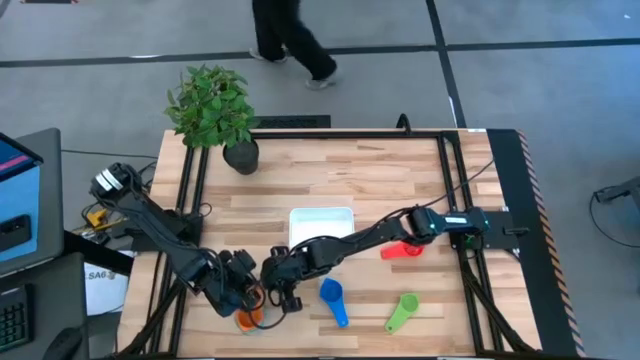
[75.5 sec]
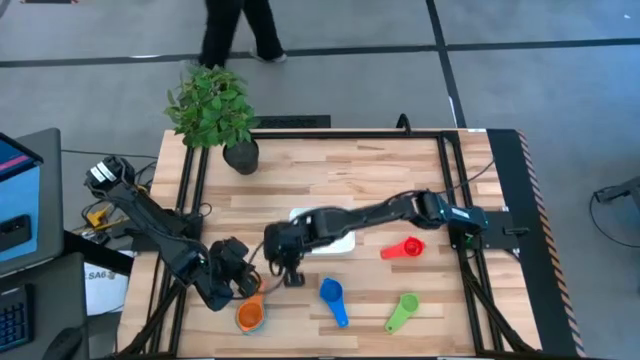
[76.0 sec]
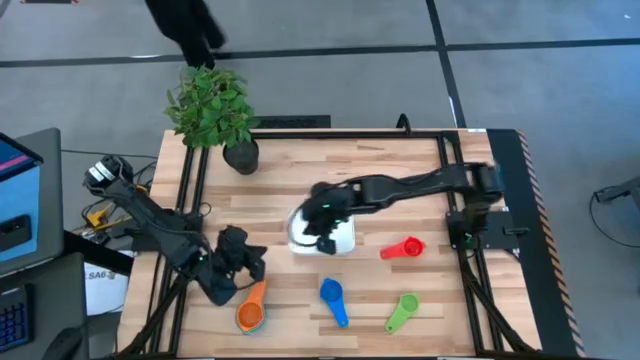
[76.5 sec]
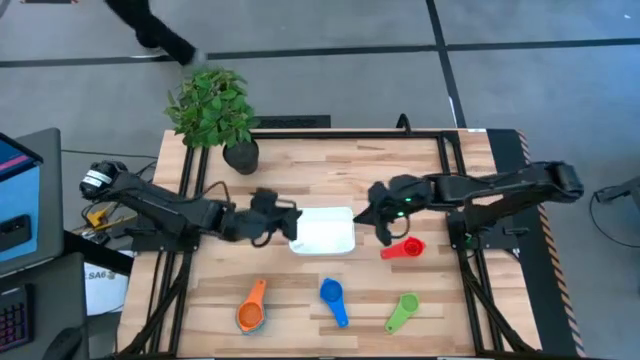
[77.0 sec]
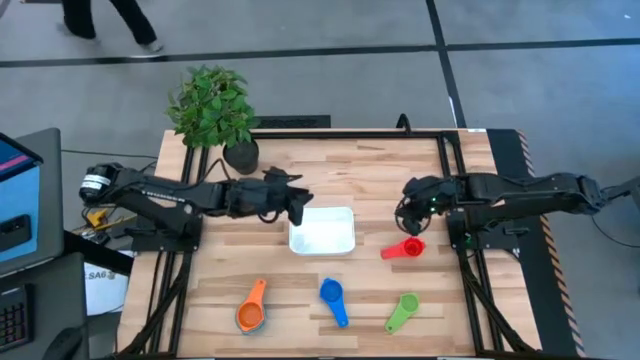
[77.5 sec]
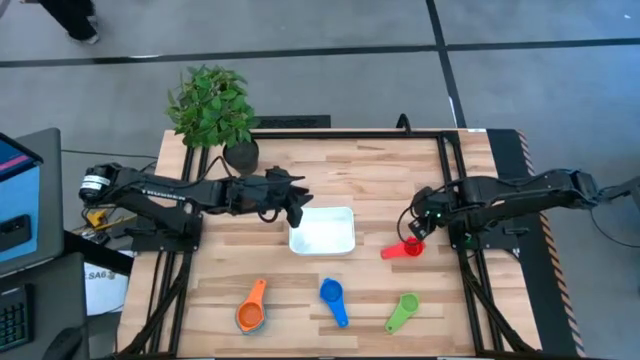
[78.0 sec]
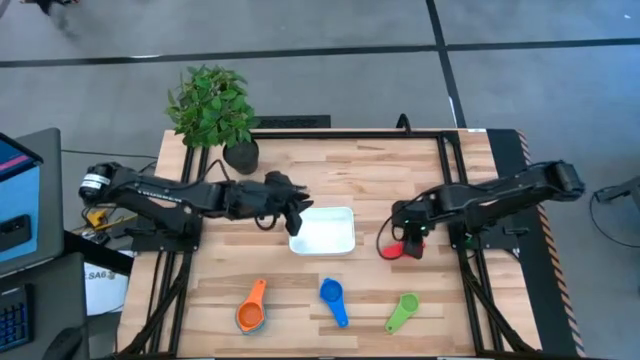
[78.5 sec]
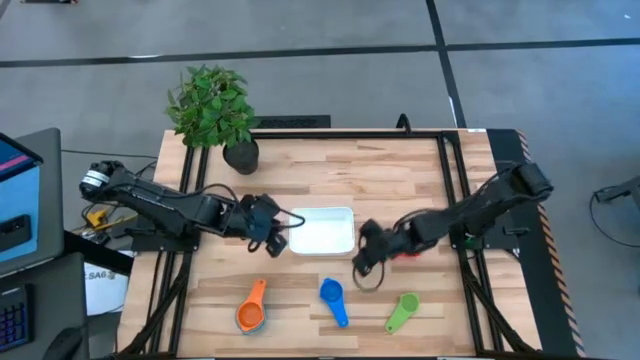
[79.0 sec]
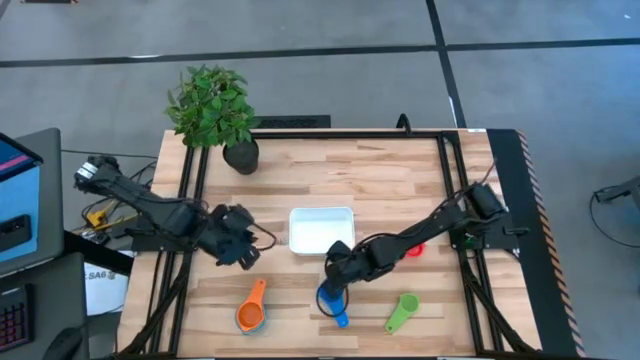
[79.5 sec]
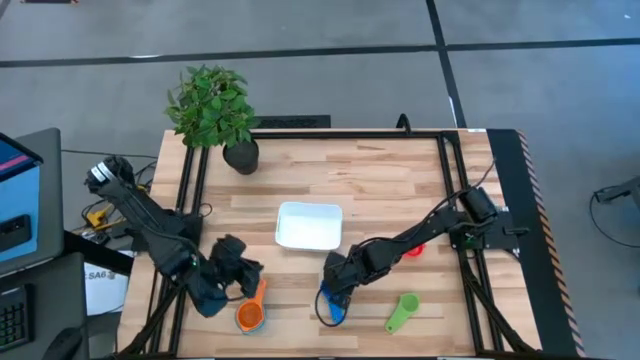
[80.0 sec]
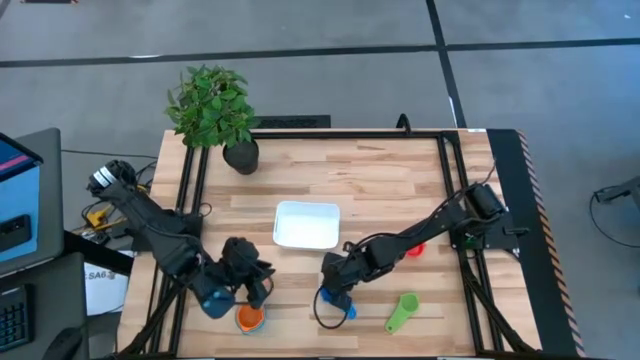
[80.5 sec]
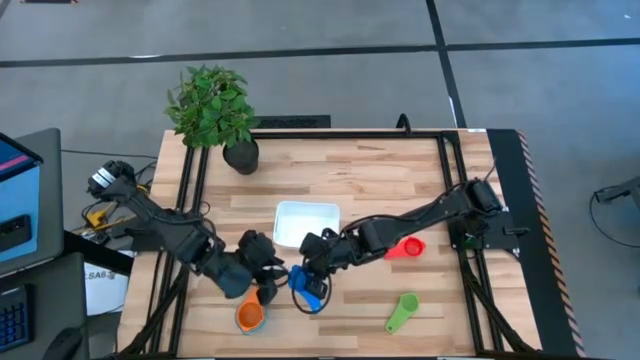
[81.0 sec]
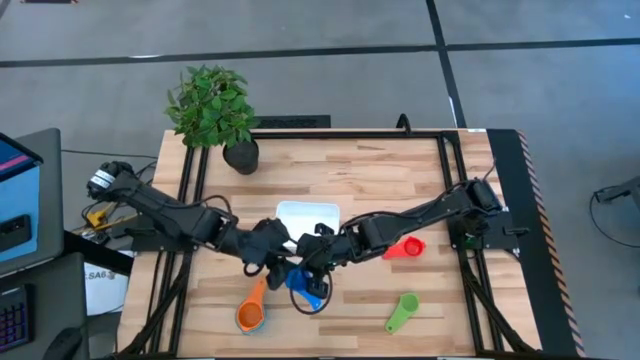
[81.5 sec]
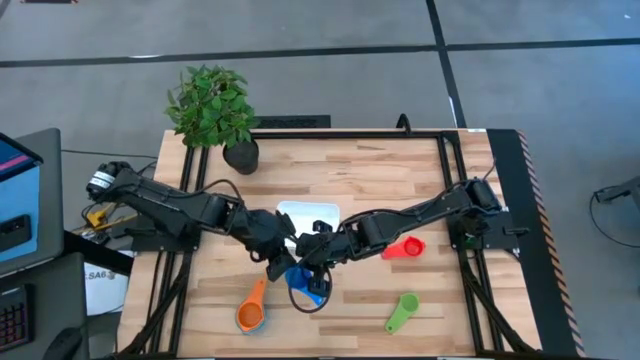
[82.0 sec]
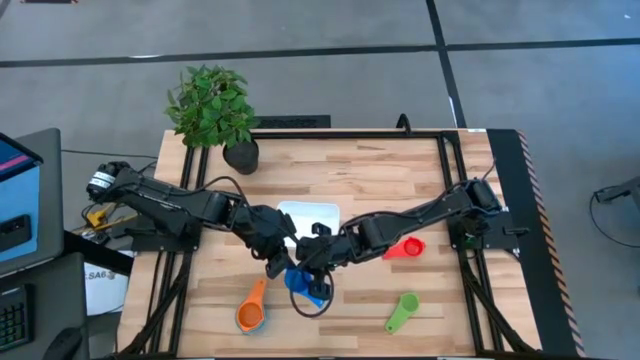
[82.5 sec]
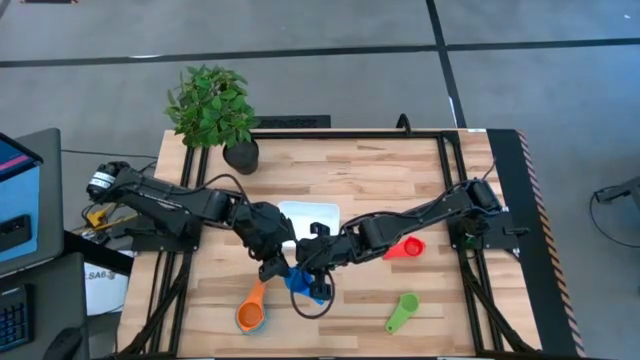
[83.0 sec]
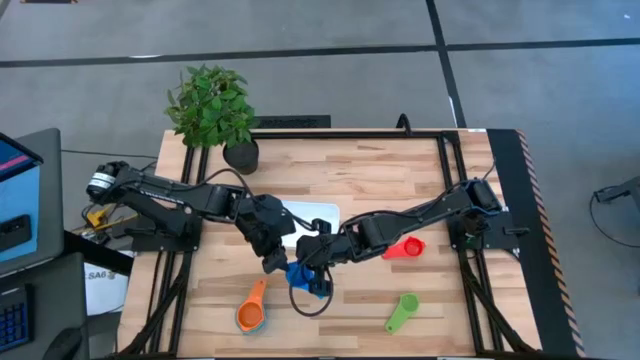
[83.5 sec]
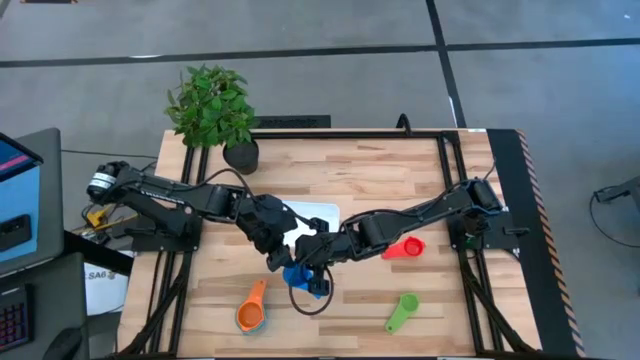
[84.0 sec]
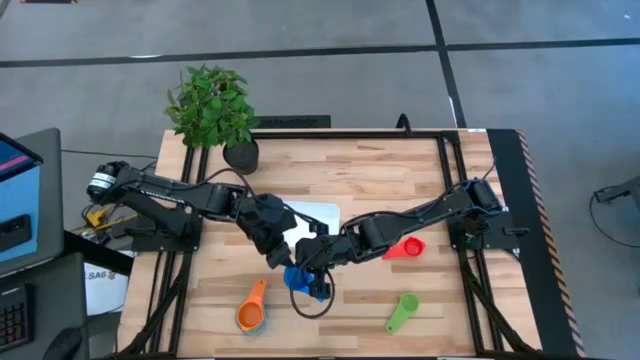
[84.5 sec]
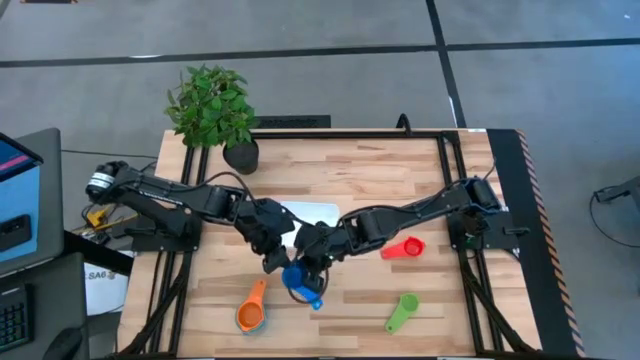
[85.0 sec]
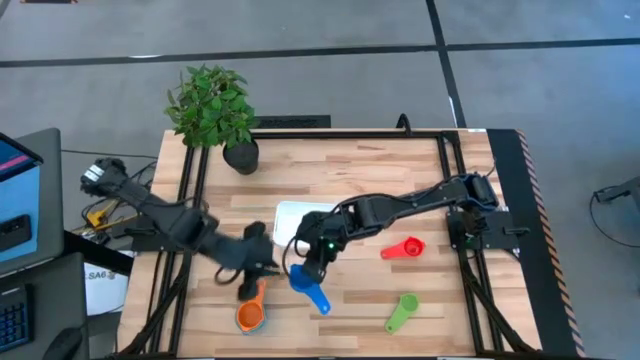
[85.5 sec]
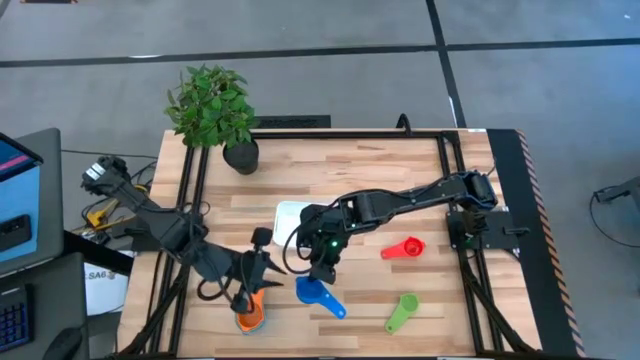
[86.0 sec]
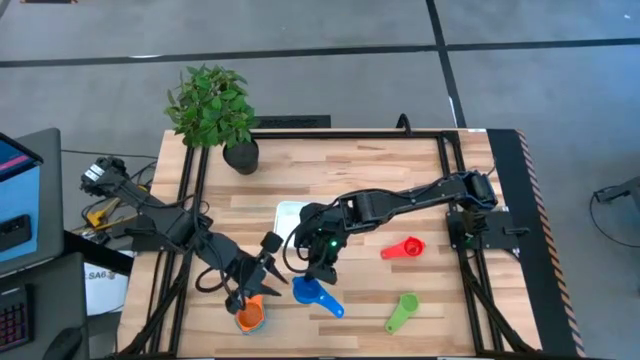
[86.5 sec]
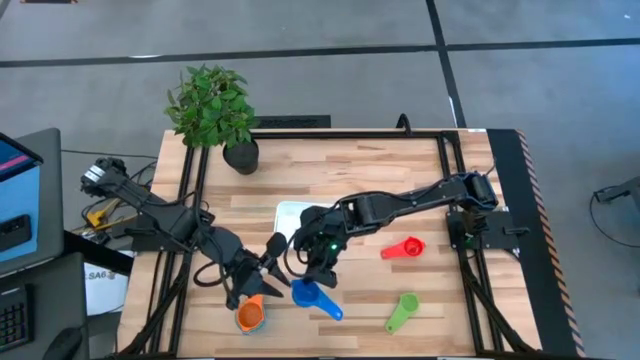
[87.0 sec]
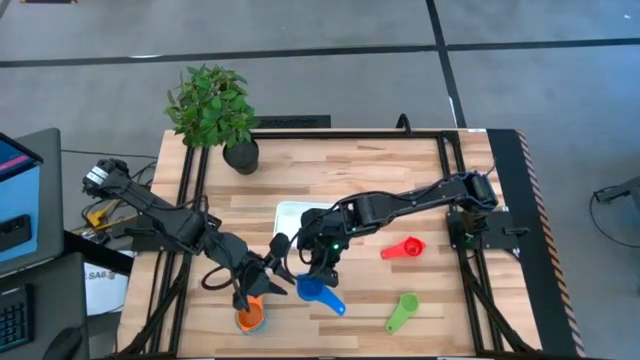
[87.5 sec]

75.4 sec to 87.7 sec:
Task: Nest measuring cups in basket
Stack the blue measuring cup into the orange measuring cup

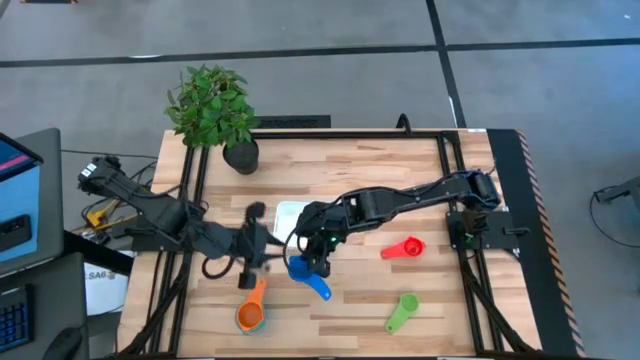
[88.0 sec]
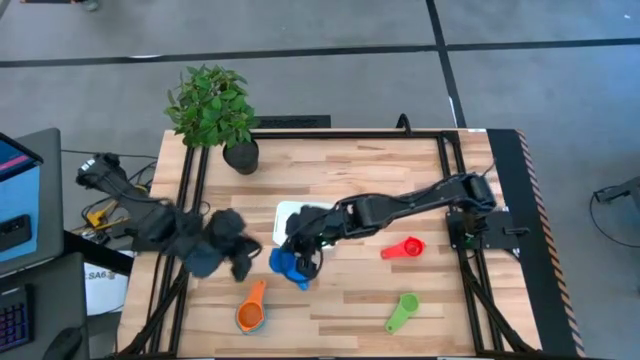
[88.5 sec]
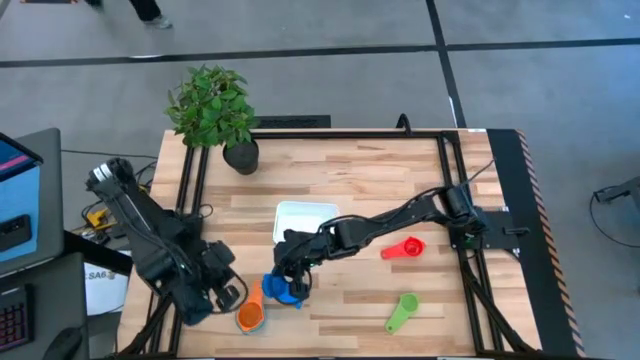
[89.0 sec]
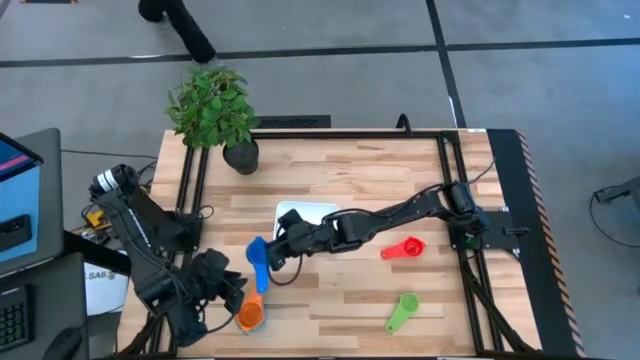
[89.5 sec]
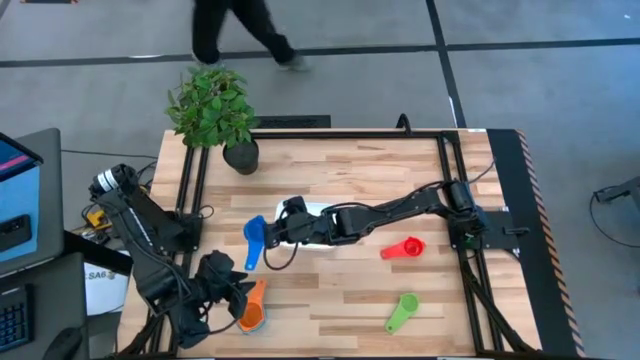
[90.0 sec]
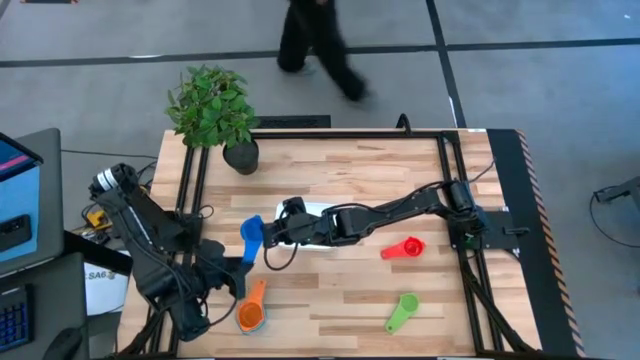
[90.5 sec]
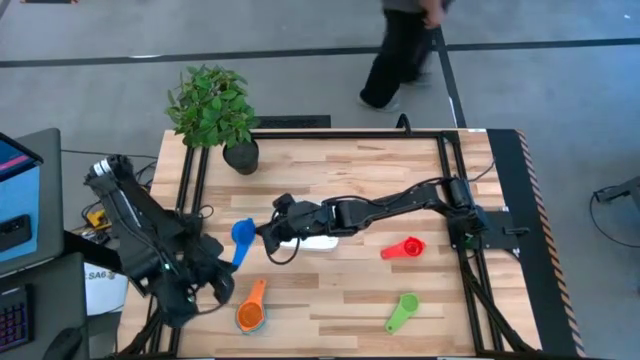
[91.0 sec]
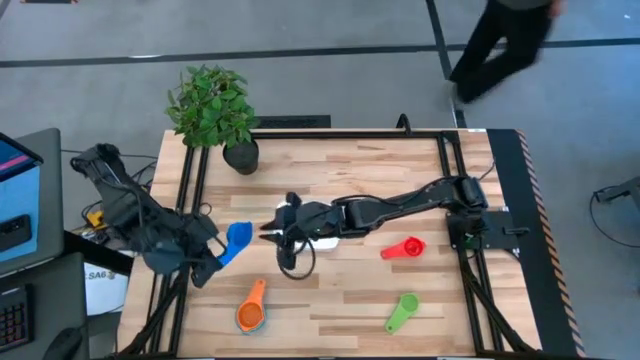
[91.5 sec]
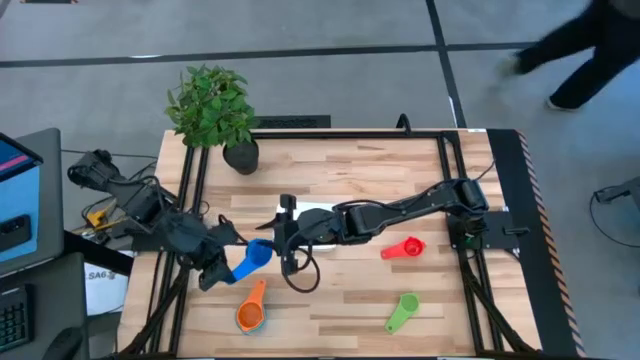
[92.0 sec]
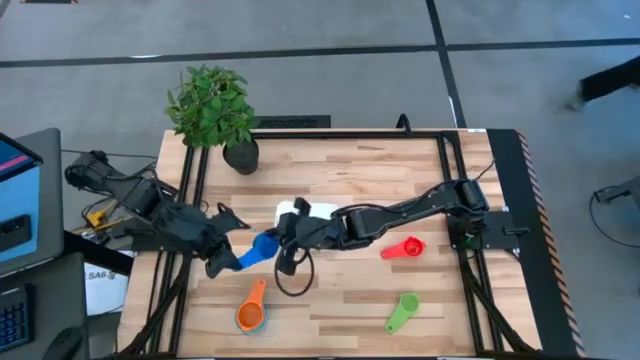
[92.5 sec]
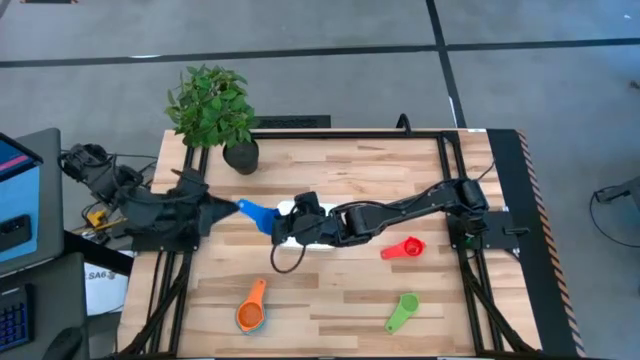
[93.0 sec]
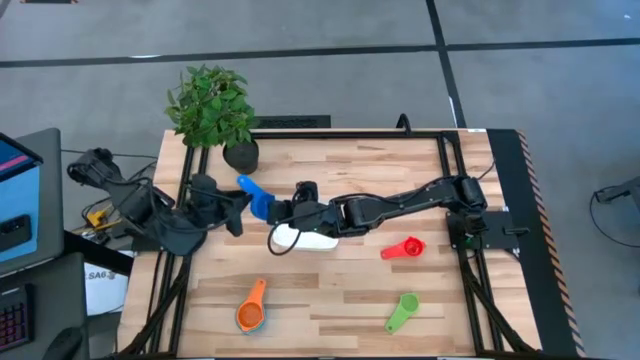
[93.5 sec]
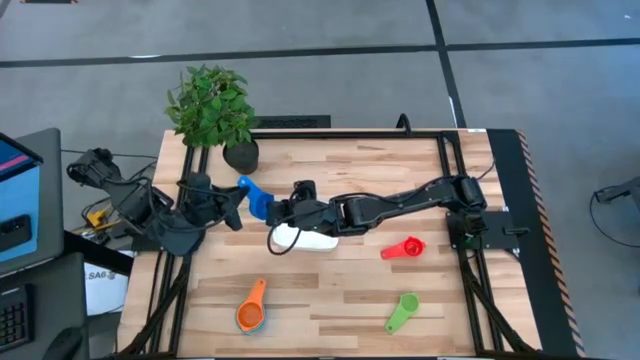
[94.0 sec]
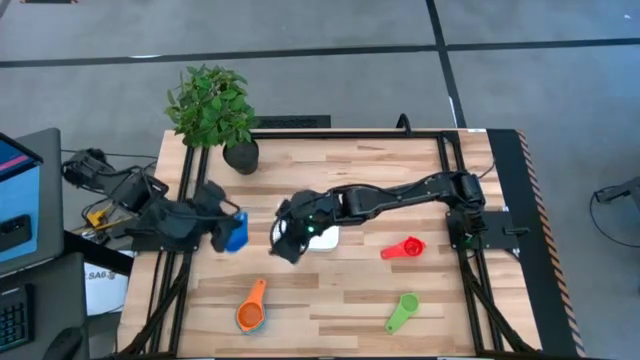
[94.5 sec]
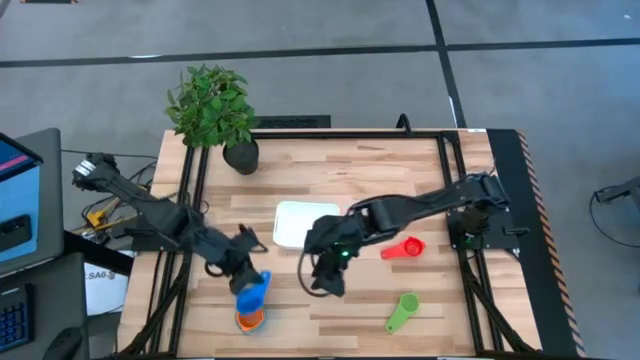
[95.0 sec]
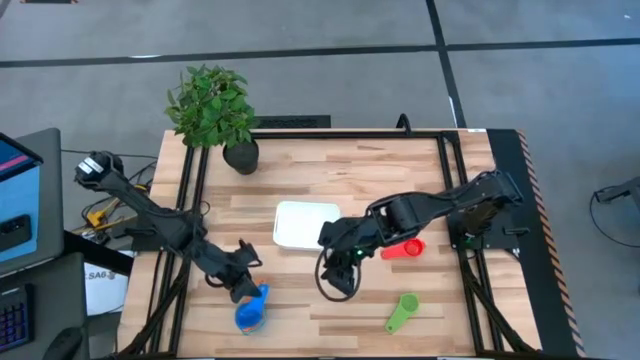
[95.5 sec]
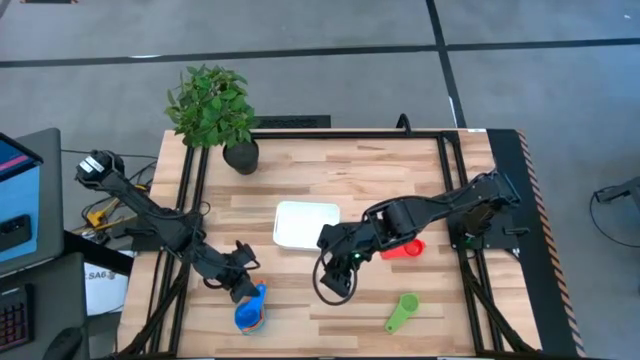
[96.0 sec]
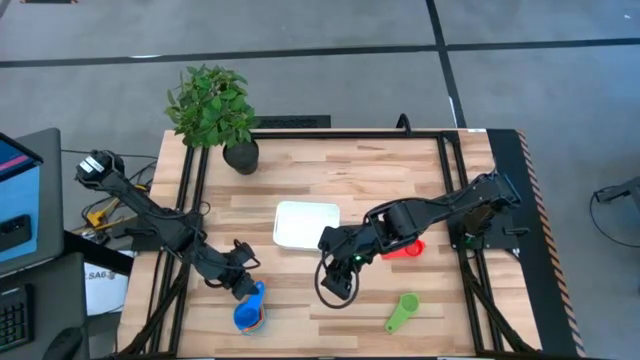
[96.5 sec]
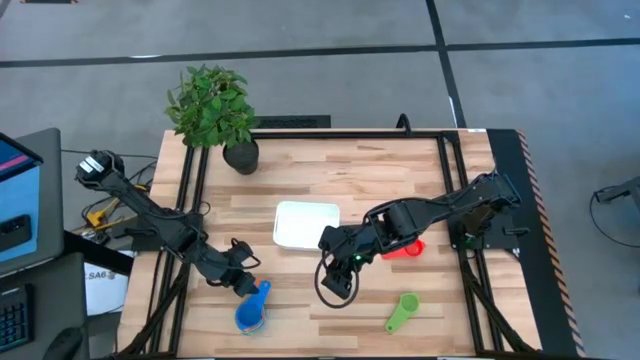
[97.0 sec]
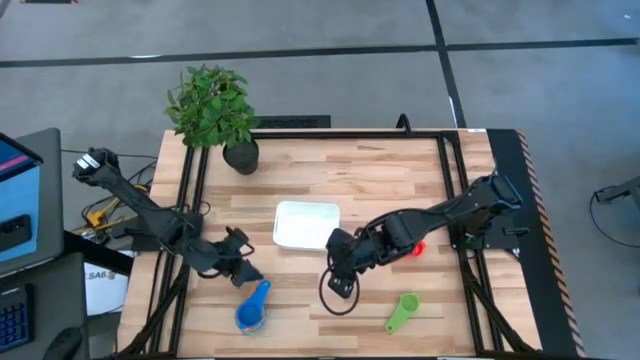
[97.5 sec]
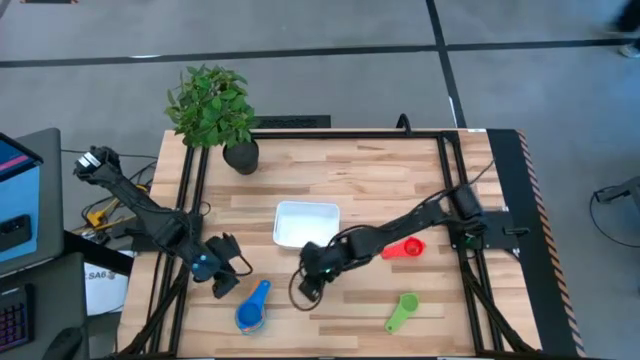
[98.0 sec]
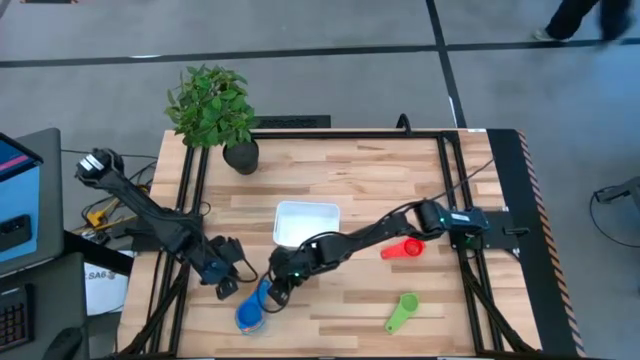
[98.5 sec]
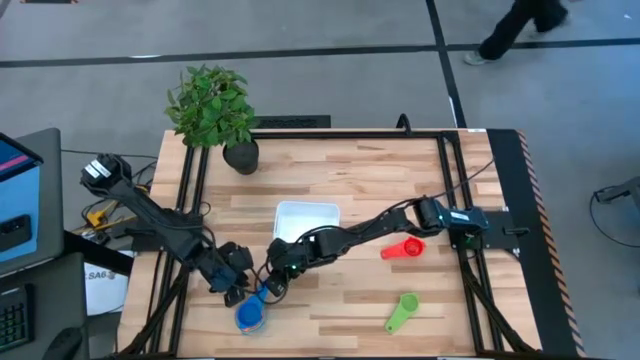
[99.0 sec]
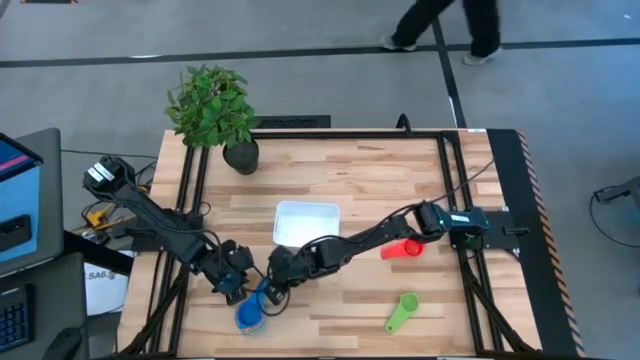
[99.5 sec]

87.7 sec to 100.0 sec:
Stack the blue measuring cup into the orange measuring cup
